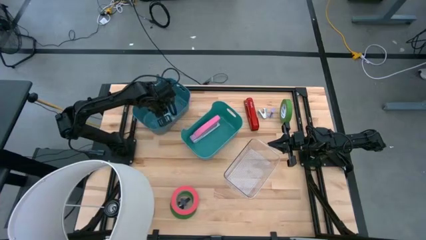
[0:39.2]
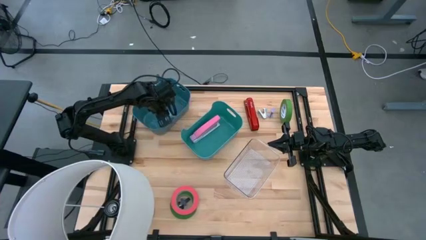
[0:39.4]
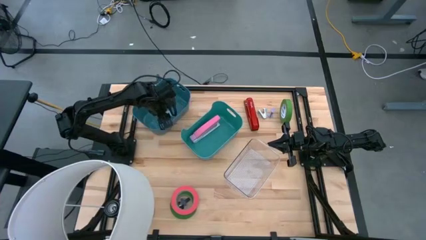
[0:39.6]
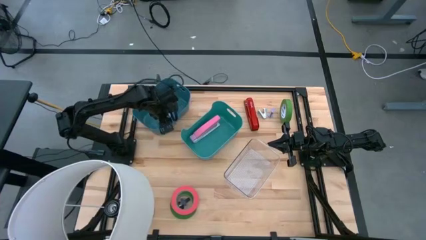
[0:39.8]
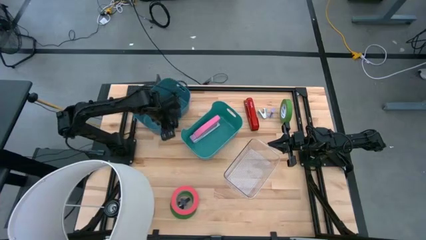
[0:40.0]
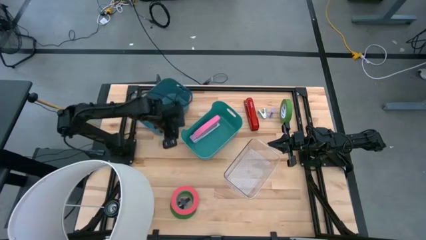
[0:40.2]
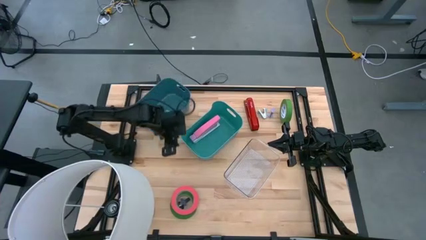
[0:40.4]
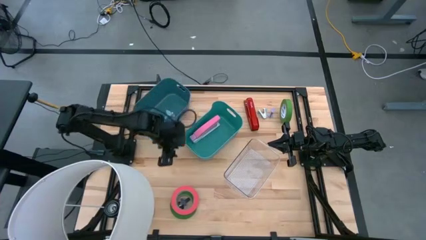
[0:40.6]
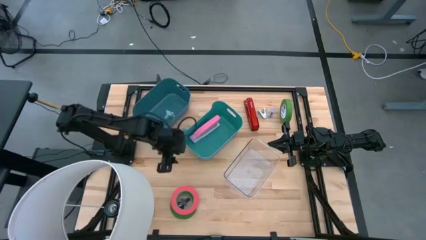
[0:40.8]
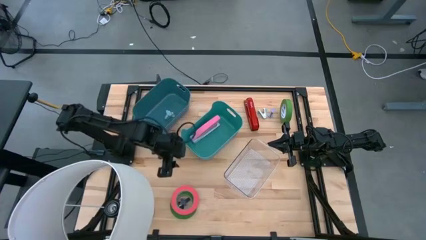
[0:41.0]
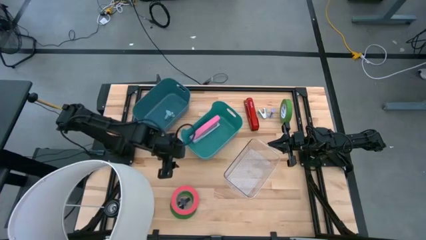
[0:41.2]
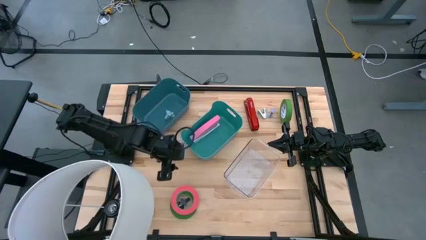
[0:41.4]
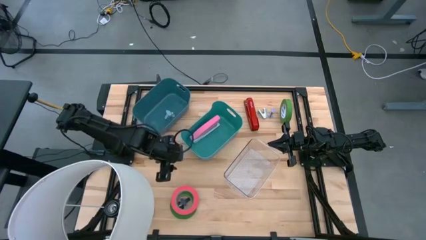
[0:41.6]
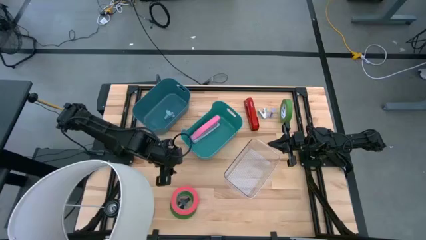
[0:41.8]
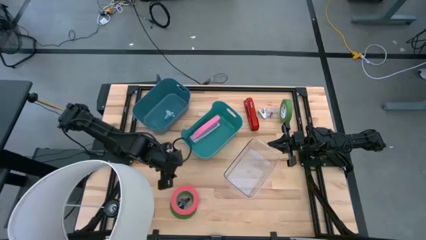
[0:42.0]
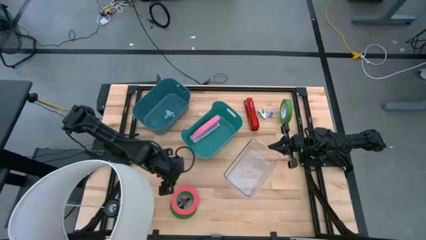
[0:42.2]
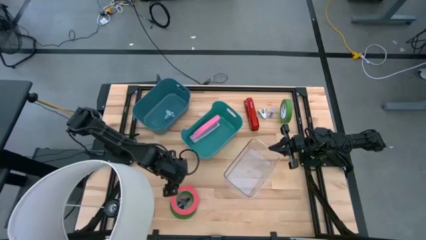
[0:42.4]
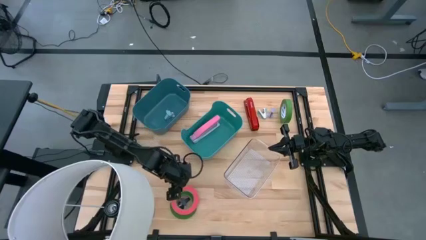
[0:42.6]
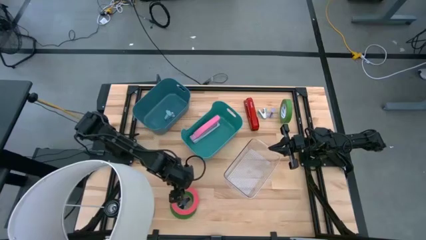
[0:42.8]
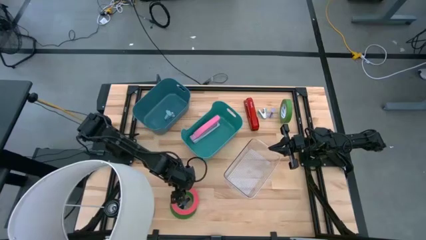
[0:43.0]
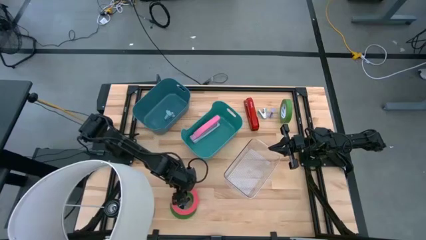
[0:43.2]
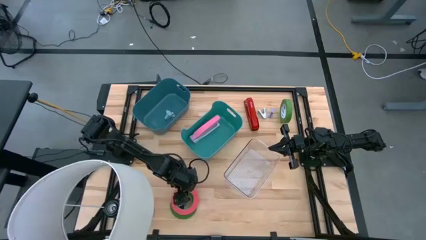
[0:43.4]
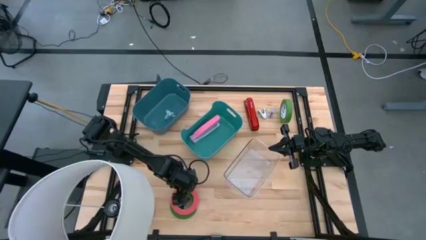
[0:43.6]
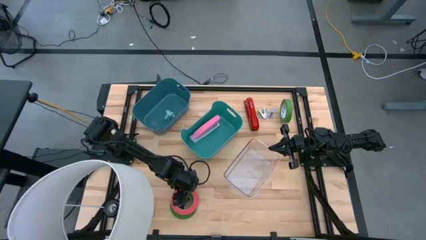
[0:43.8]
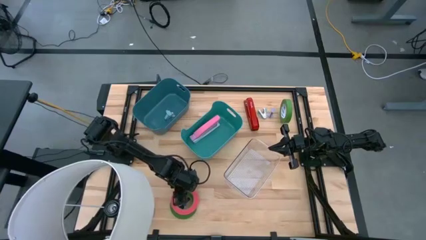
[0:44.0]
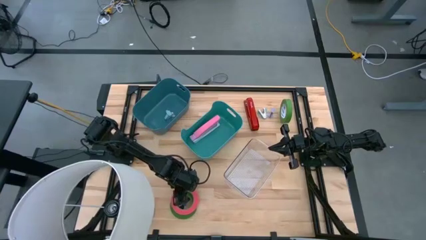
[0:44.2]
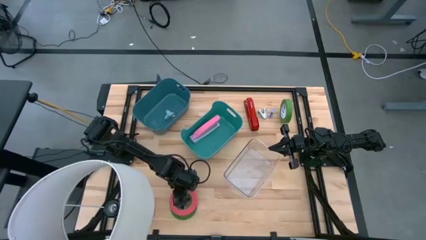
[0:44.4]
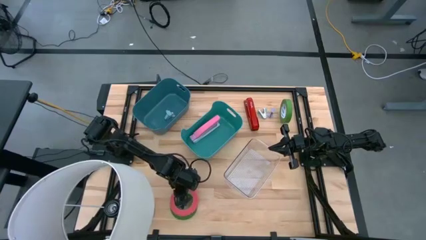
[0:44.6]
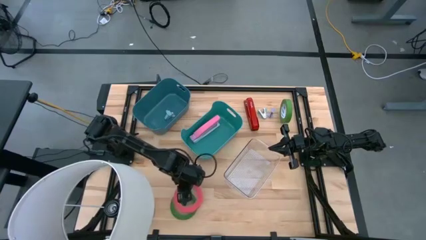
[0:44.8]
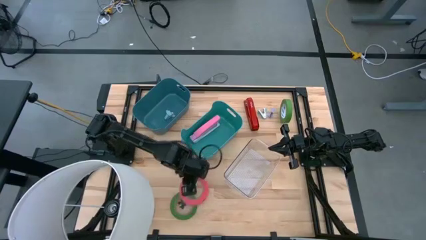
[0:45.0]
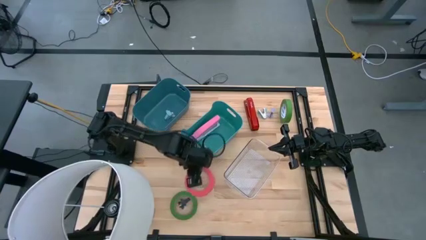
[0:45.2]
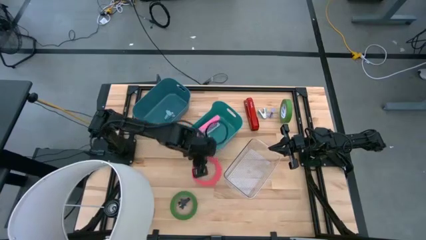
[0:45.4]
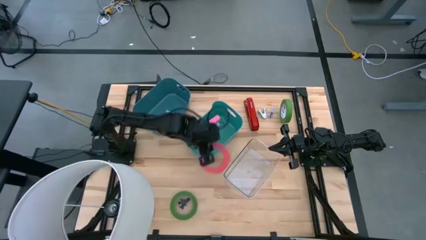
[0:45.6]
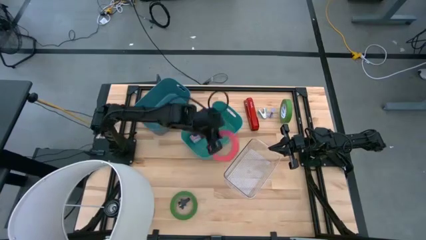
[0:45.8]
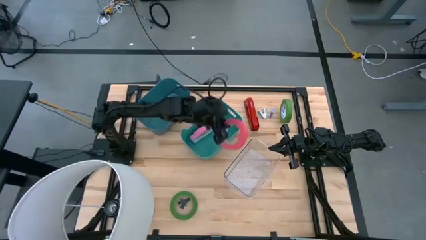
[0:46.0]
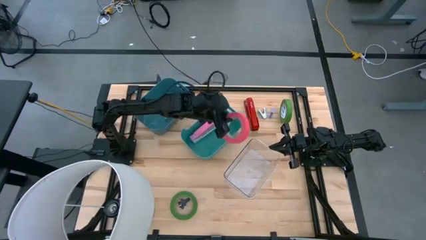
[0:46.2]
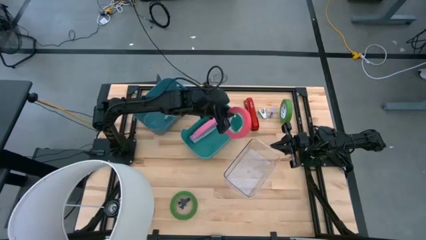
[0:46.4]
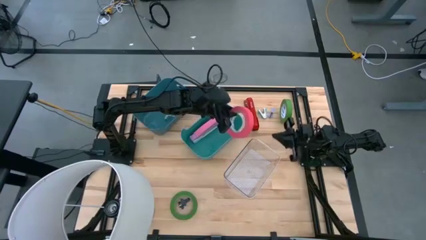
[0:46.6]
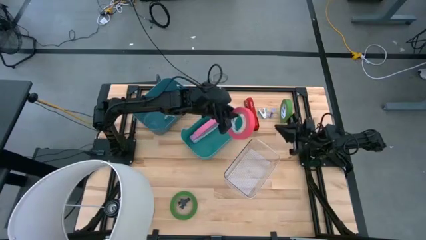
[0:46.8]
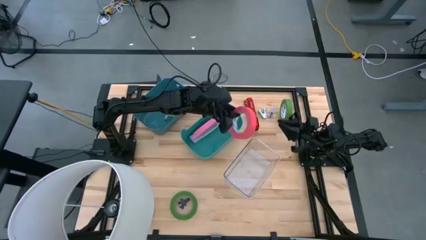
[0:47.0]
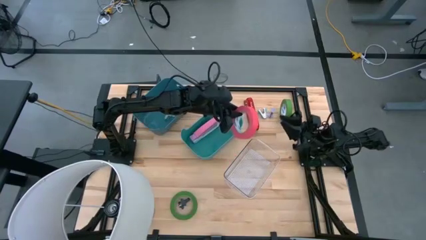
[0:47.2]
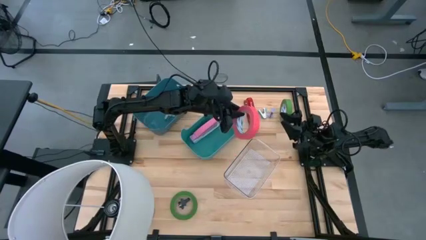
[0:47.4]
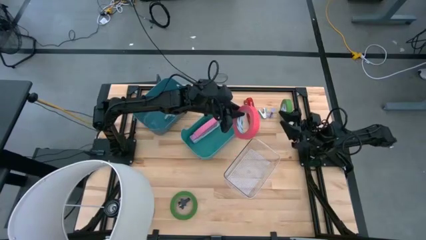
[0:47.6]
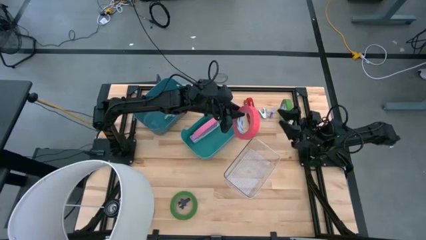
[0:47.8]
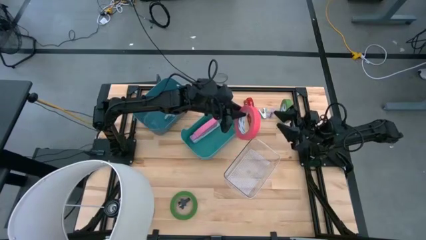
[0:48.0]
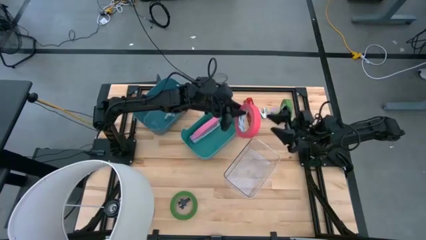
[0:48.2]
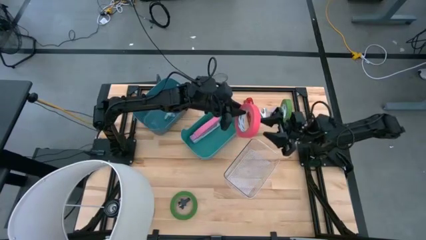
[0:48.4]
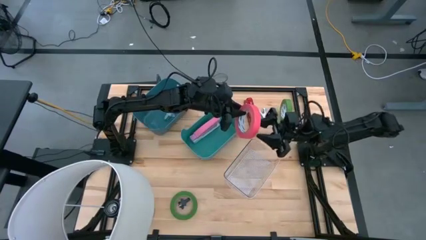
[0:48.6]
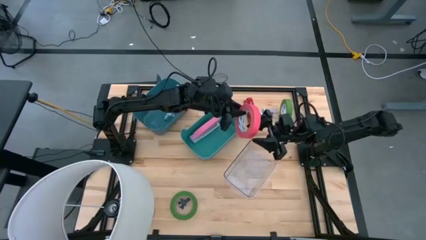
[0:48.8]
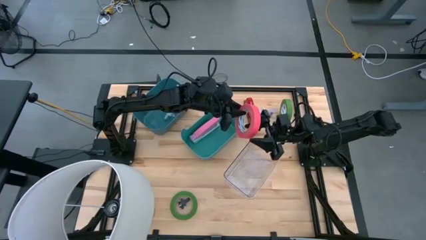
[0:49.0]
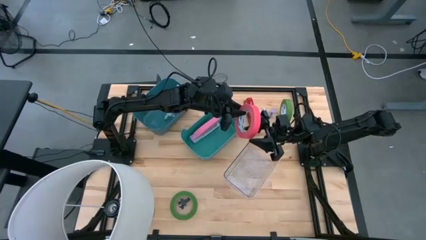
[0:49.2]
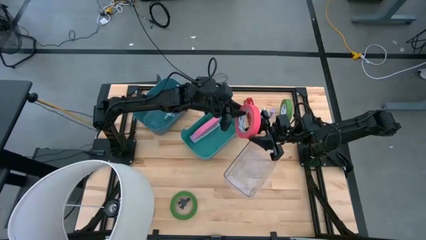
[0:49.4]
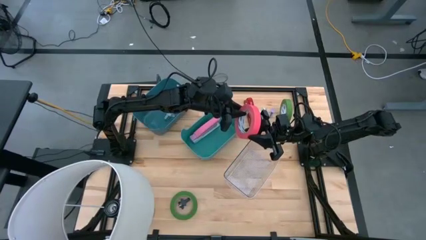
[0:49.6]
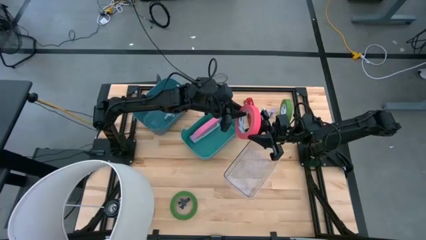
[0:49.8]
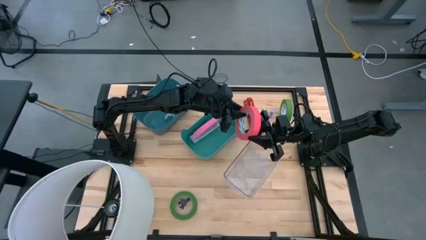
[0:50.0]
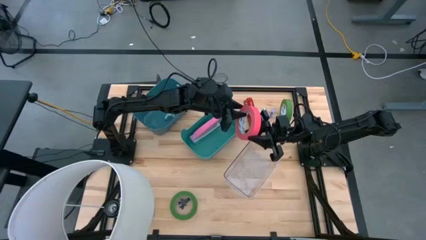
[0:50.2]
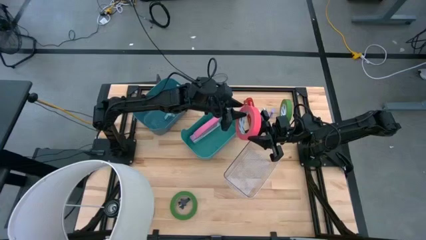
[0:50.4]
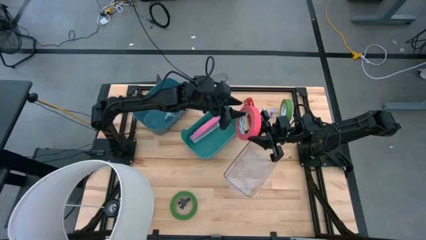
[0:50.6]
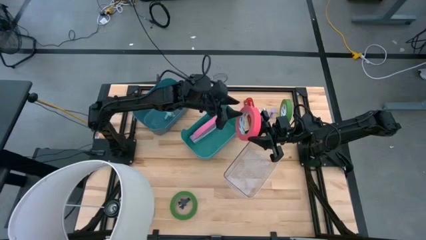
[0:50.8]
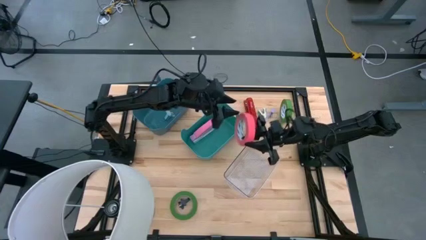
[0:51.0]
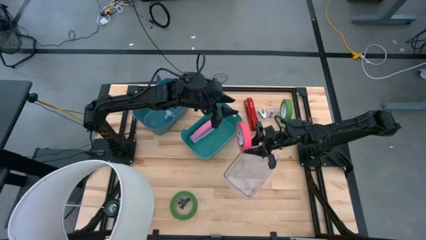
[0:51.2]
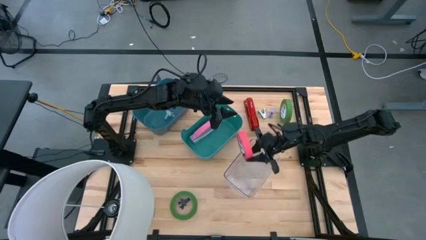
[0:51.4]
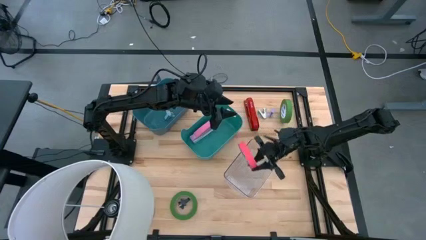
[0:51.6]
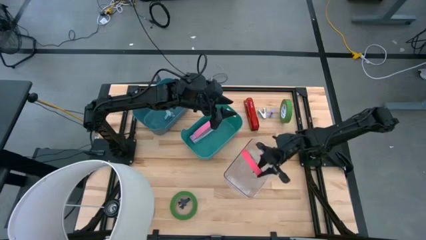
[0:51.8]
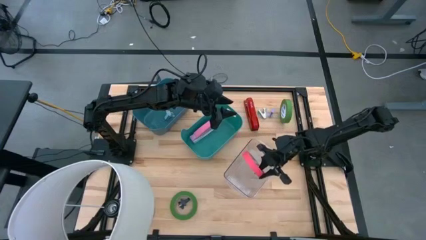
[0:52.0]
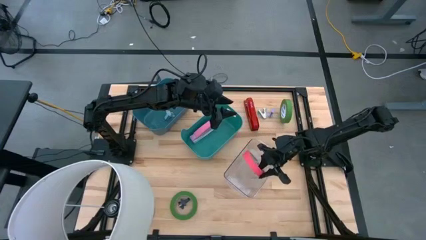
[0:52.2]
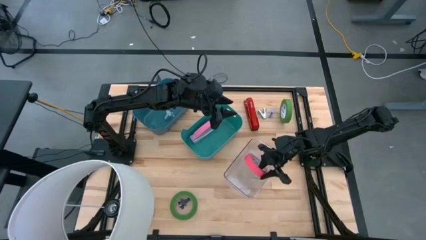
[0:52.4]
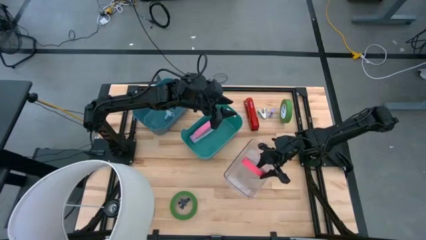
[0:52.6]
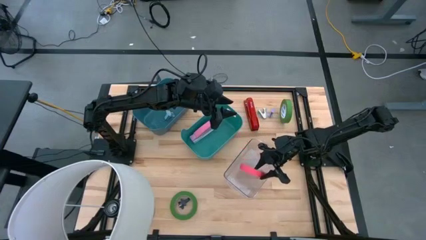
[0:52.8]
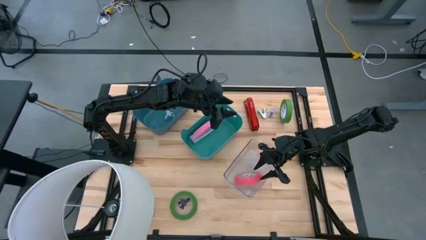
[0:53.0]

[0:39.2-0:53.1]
Task: Pick and place Stapler, Stapler remover, tape
Put the pink tape into the transparent bin
